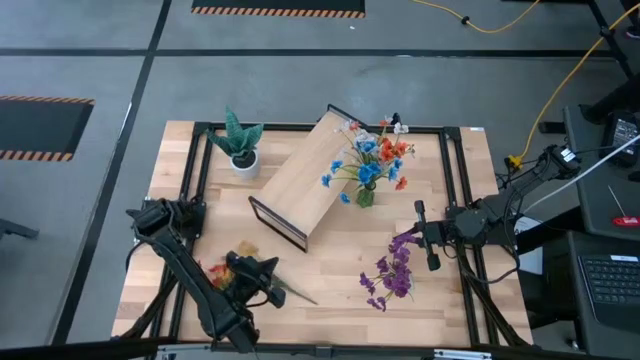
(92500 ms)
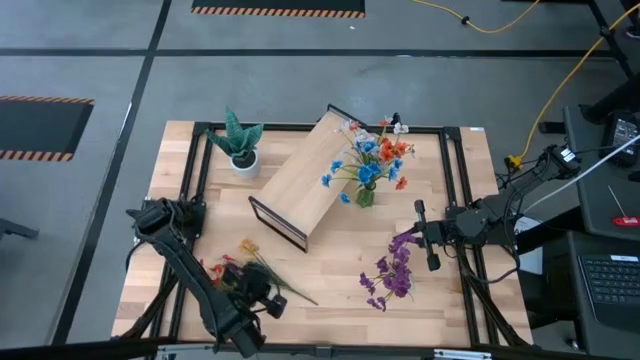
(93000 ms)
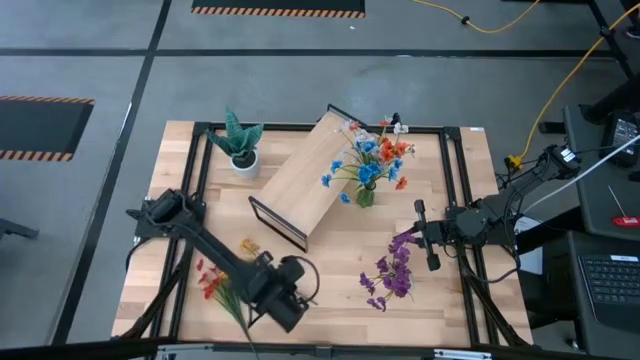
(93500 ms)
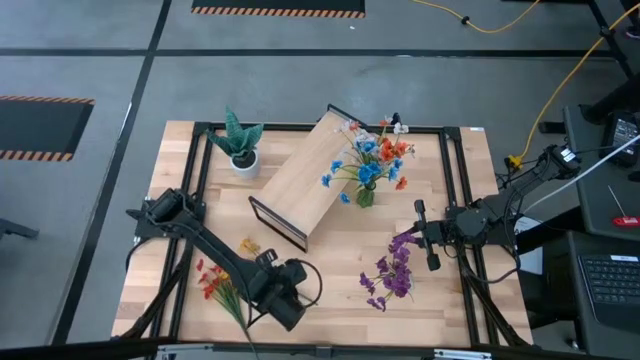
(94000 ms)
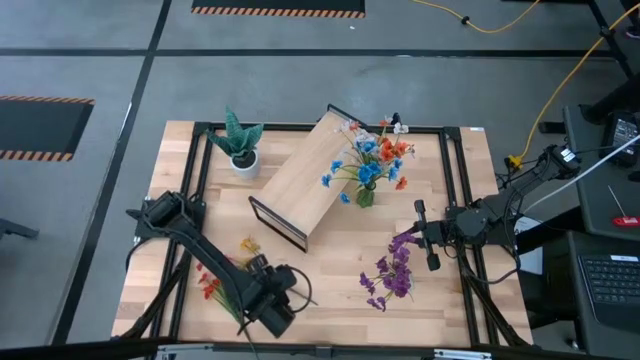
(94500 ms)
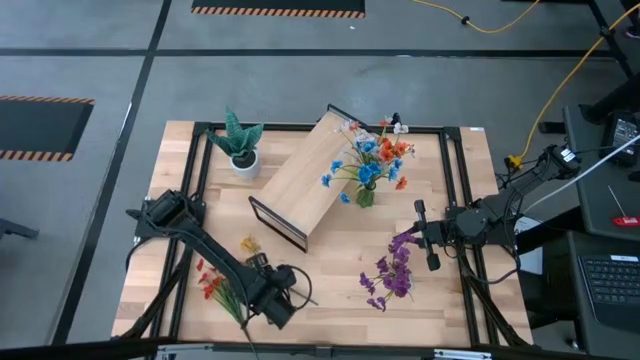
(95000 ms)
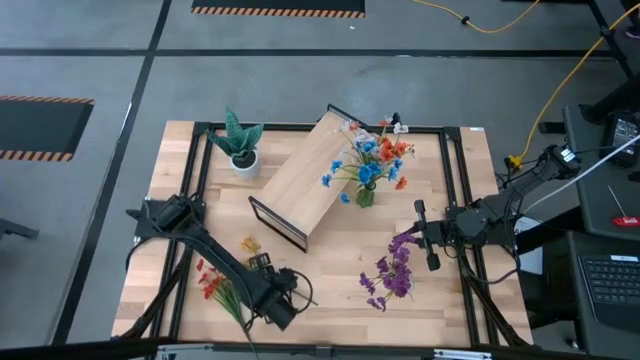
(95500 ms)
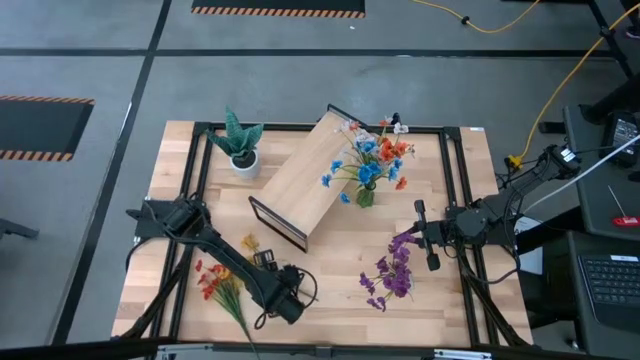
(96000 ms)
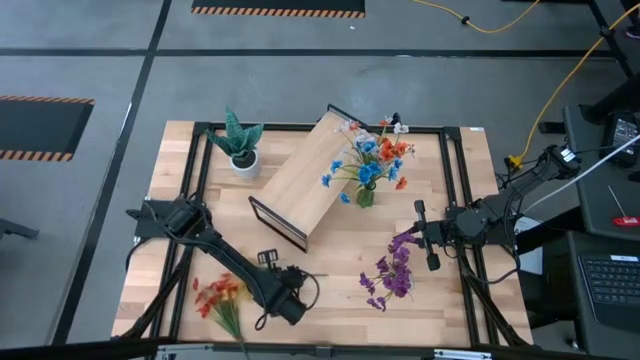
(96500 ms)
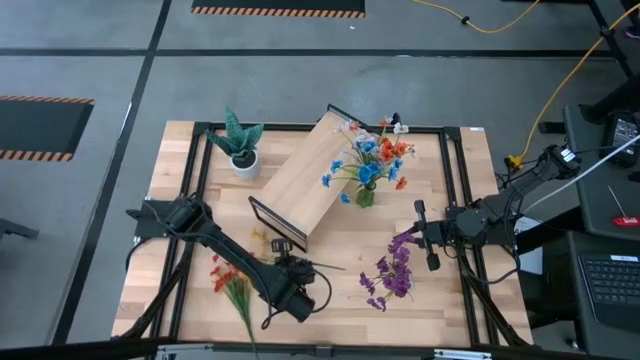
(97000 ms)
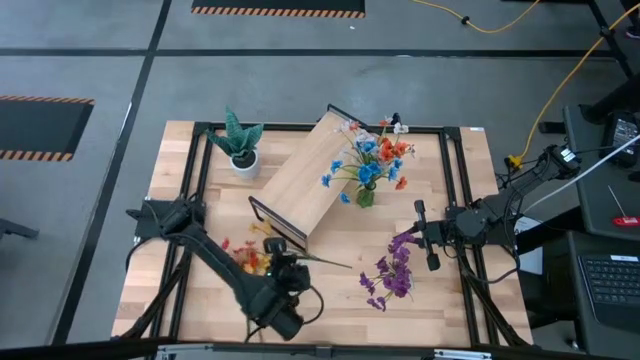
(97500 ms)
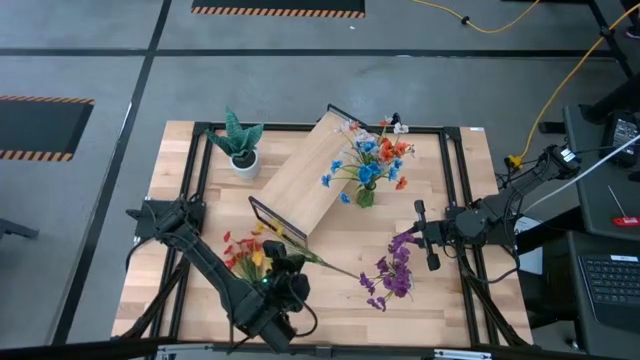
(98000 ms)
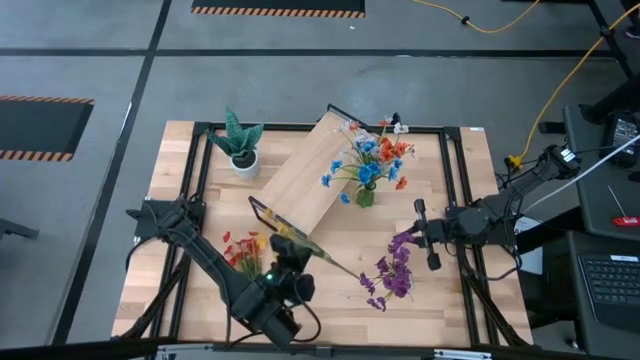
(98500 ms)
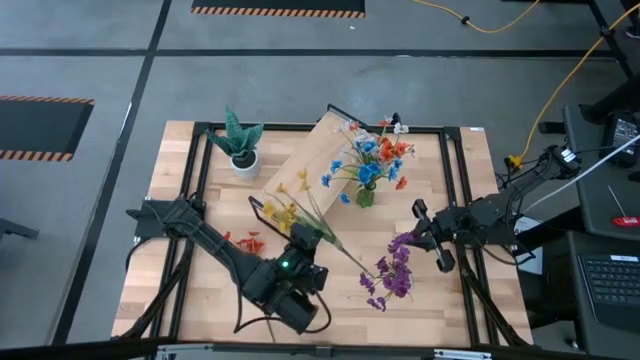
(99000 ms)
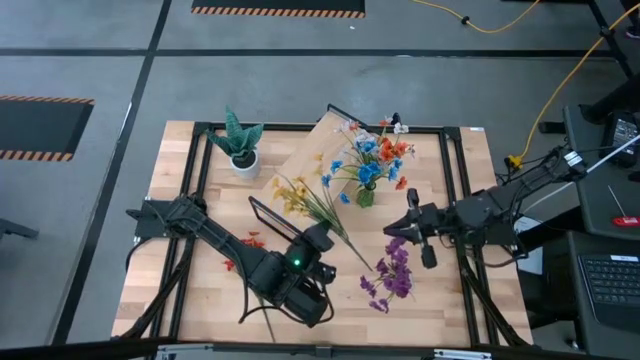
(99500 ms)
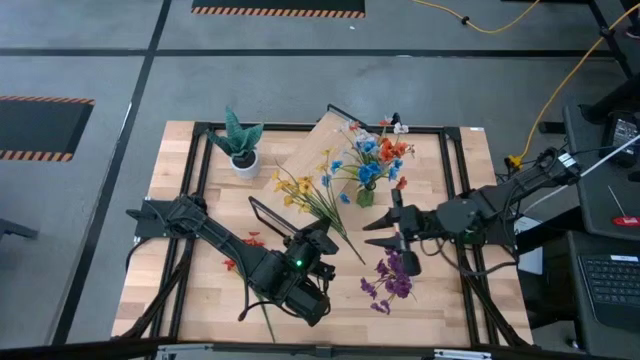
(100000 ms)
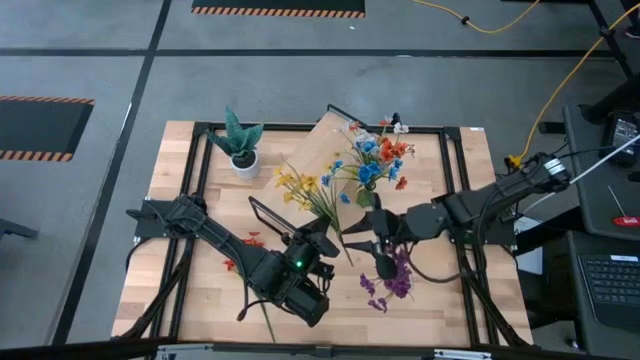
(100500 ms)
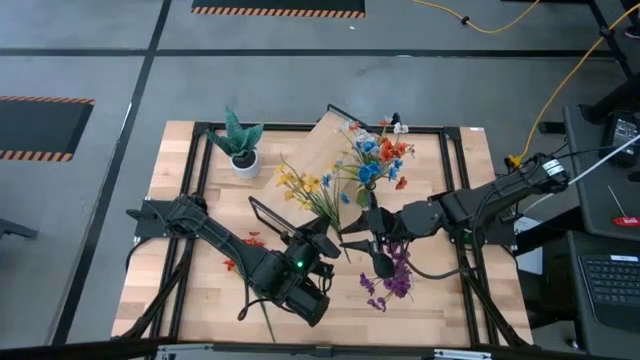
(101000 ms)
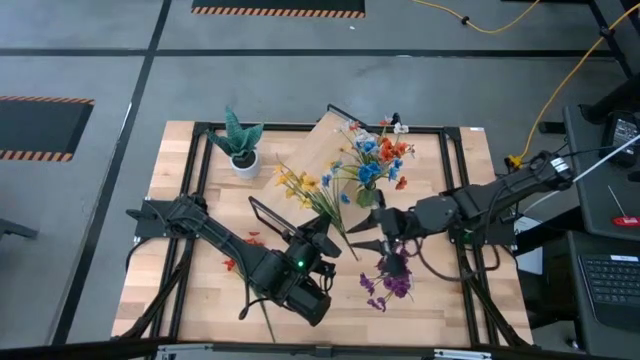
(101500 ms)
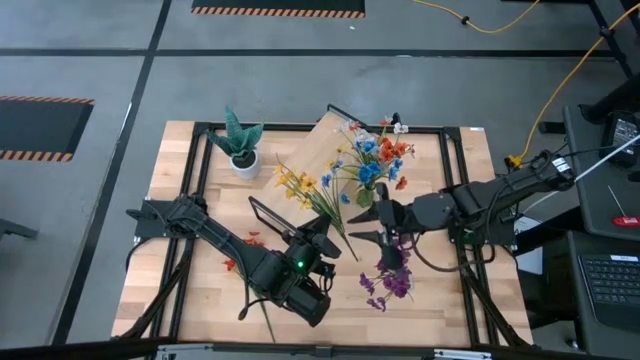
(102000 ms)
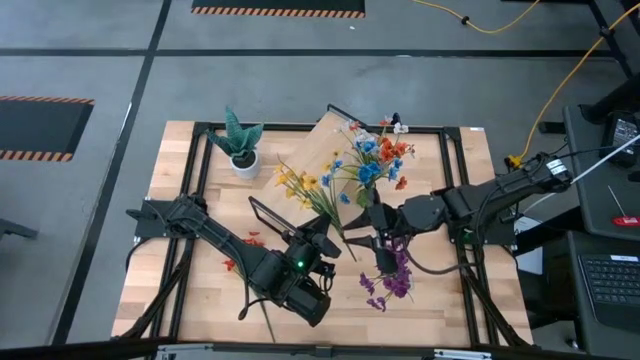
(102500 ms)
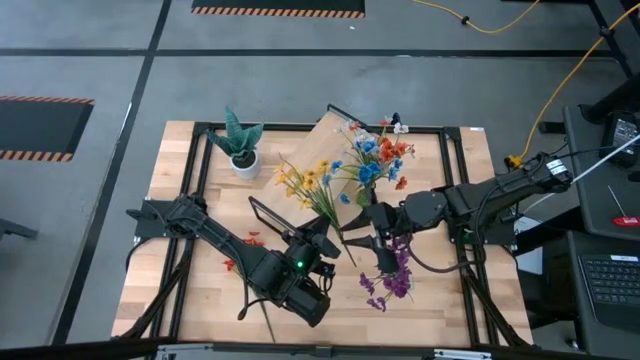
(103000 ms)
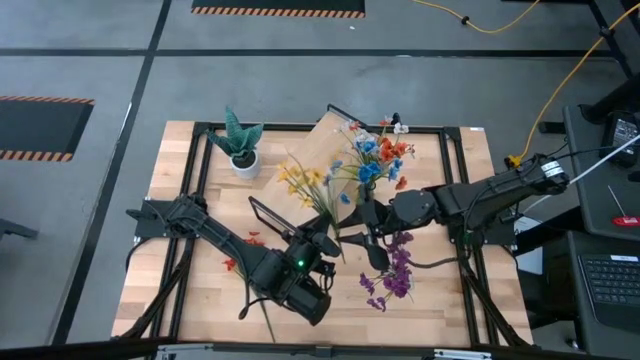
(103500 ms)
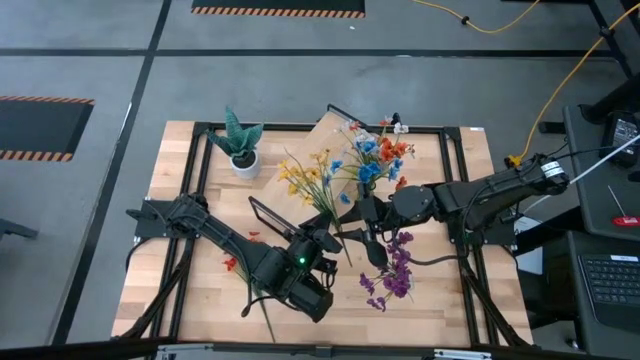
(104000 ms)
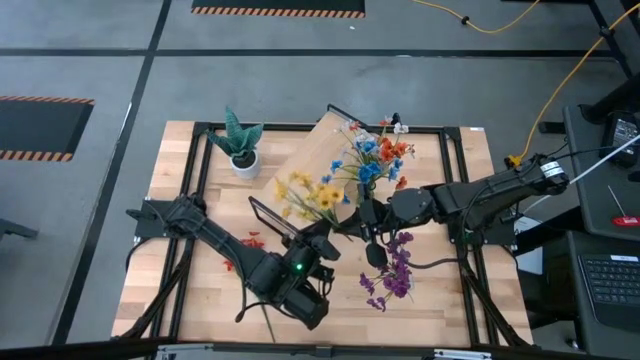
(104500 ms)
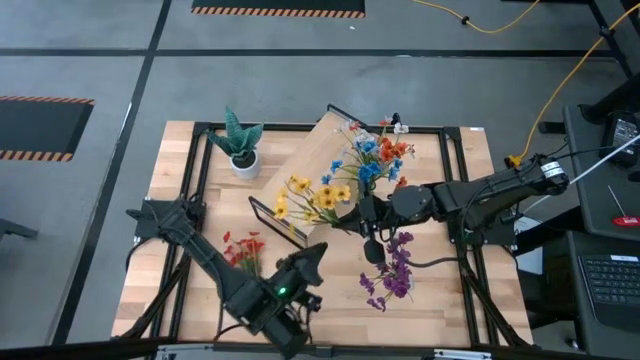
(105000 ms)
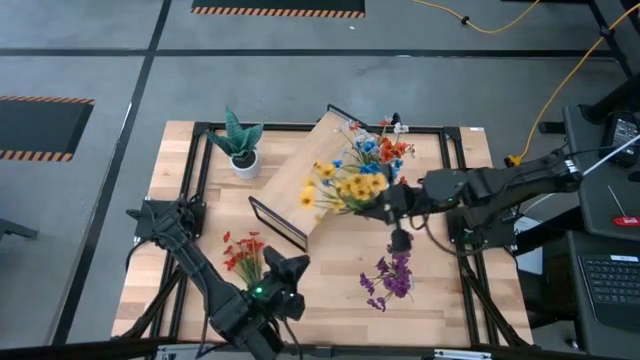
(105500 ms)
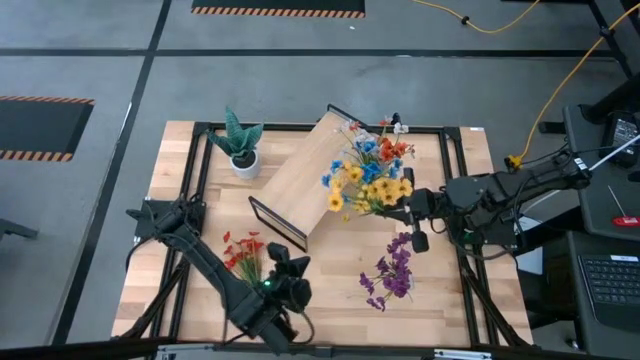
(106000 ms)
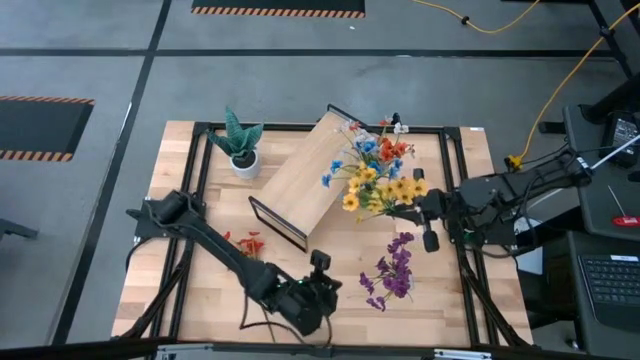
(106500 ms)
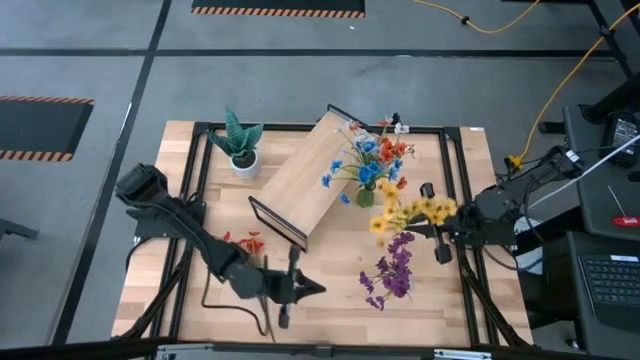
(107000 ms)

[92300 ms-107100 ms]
Task: Pick and place flowers into a vace then onto a shelf
Put the yellow flowers into the transparent vase

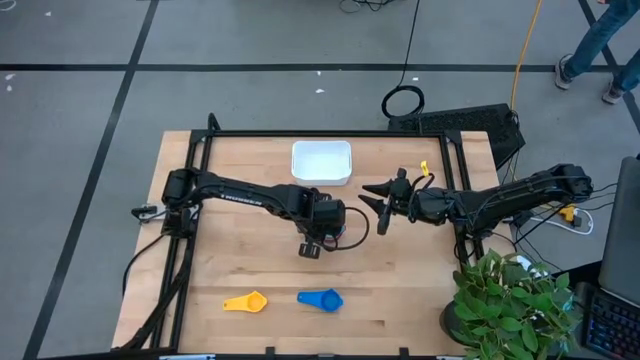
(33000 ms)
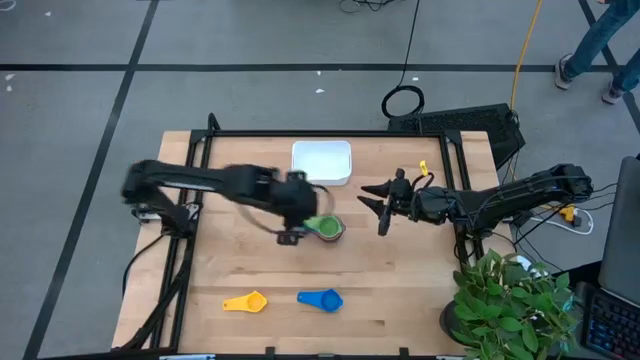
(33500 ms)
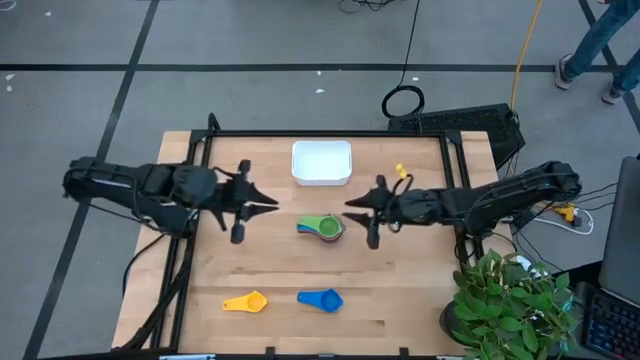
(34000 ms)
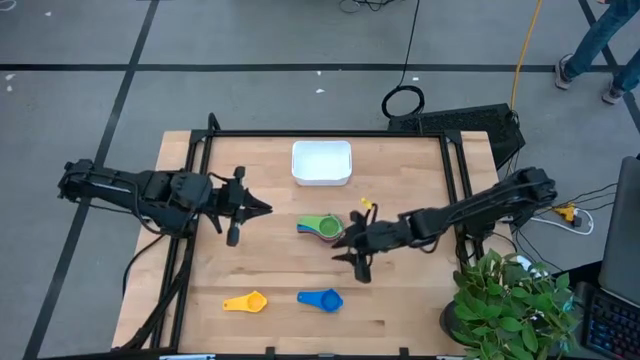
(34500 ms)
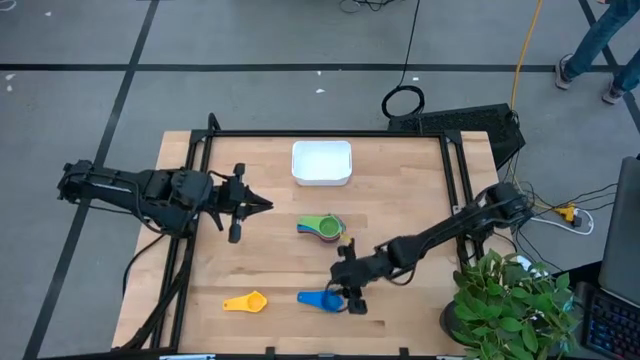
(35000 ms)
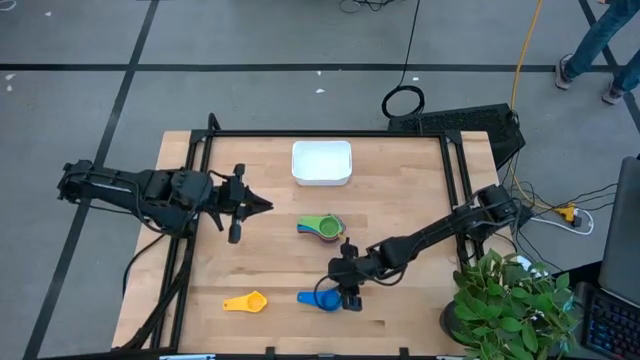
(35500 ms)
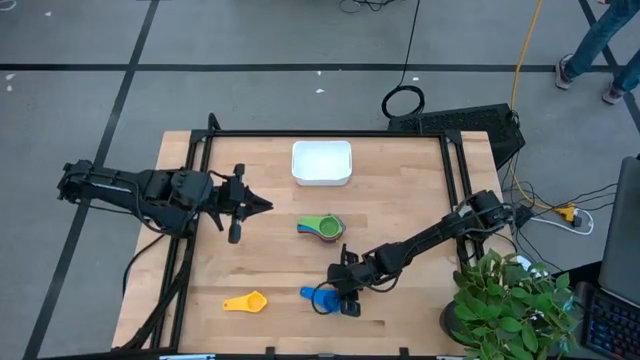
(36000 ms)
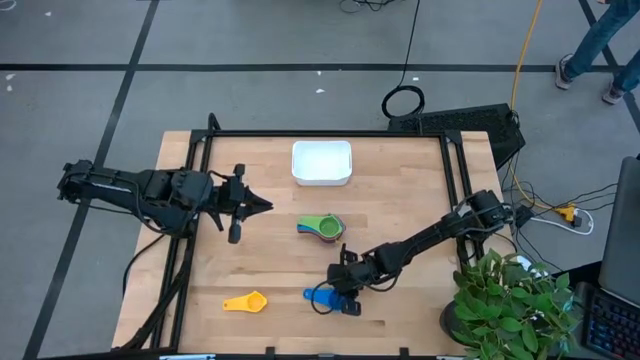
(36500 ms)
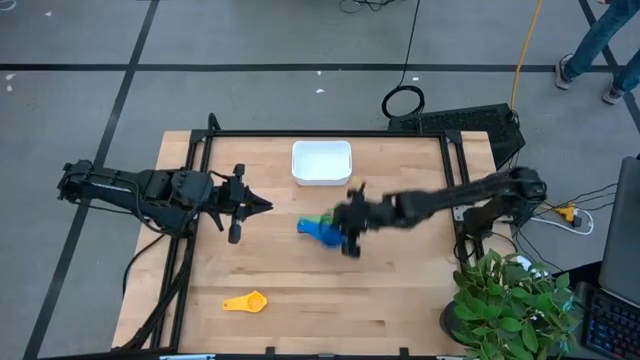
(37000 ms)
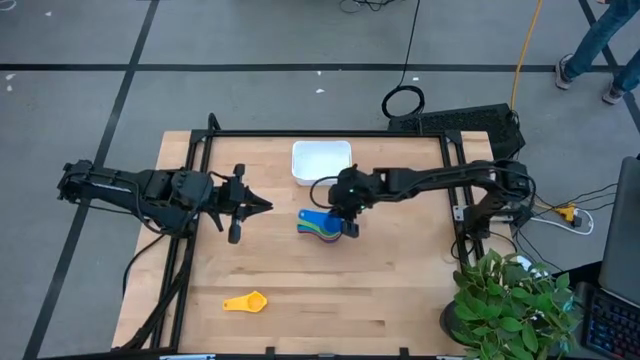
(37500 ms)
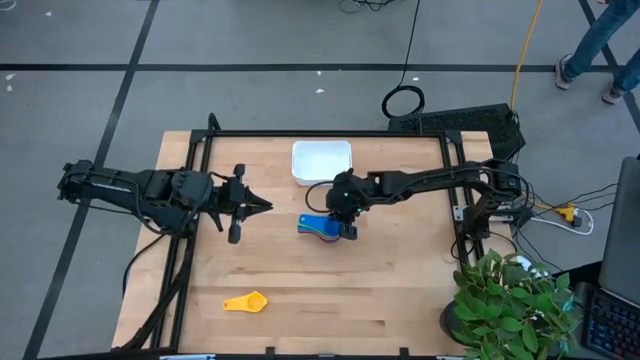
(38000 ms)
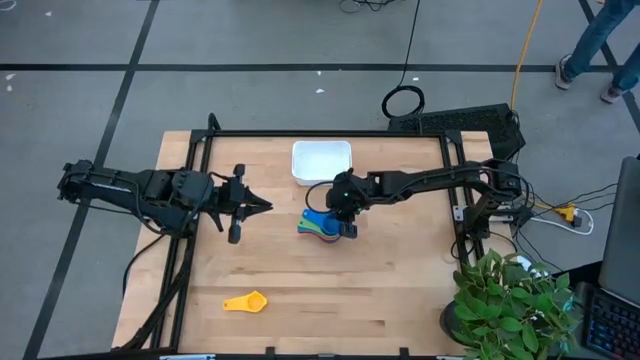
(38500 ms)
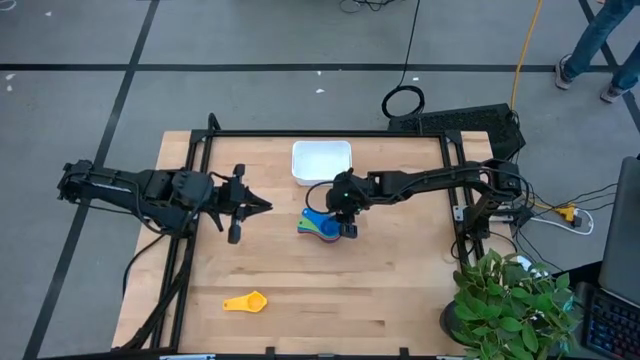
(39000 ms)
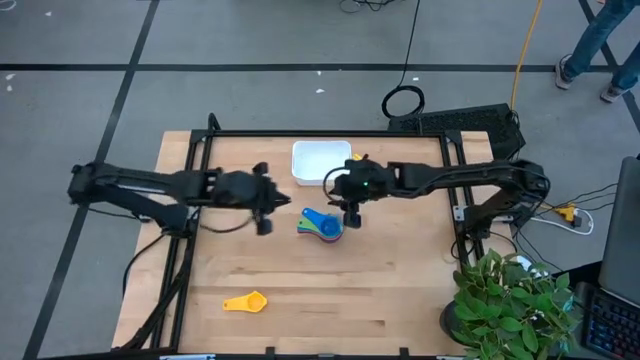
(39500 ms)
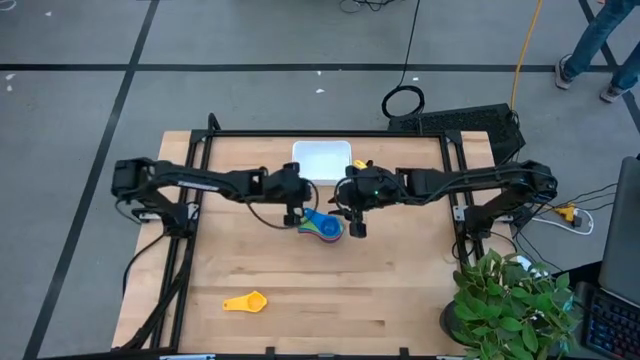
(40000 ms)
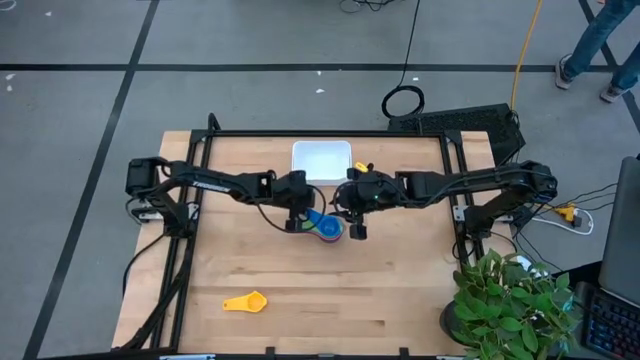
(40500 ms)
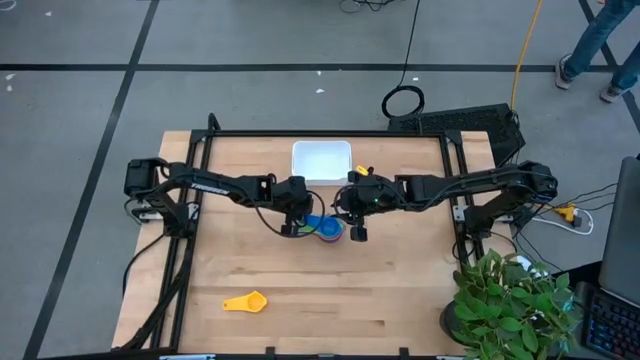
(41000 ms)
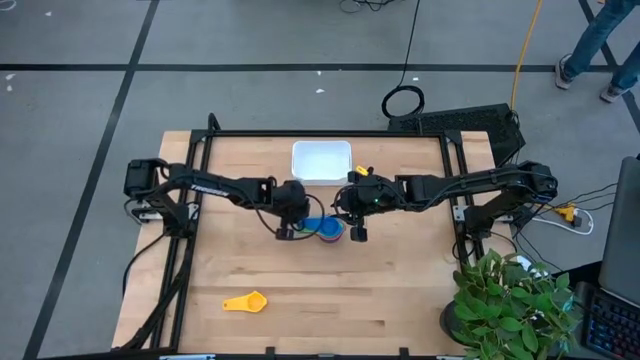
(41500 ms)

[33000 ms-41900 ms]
Task: Nest measuring cups in basket
Stack the blue measuring cup on the green measuring cup
